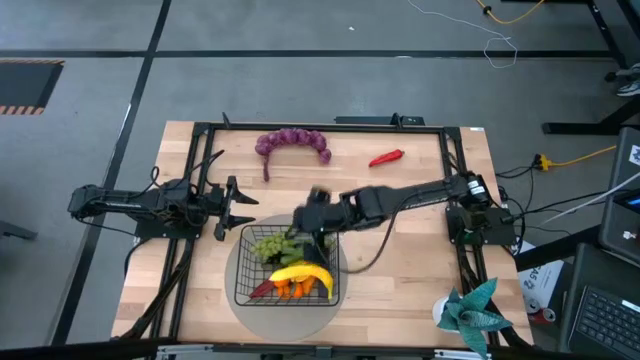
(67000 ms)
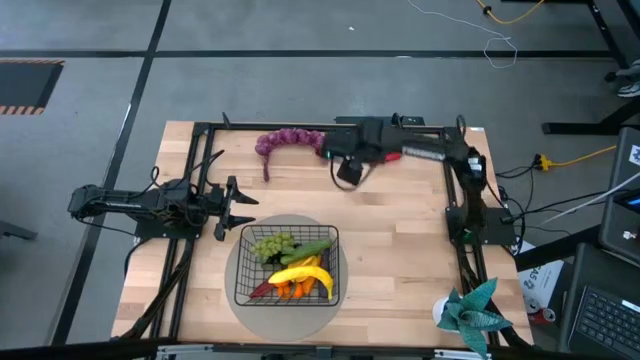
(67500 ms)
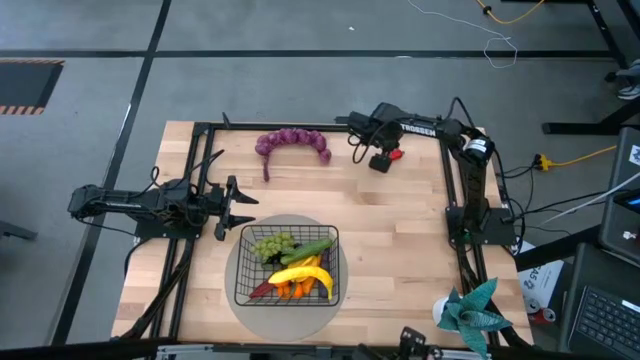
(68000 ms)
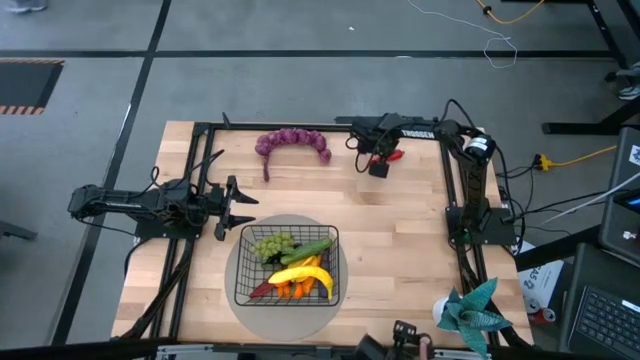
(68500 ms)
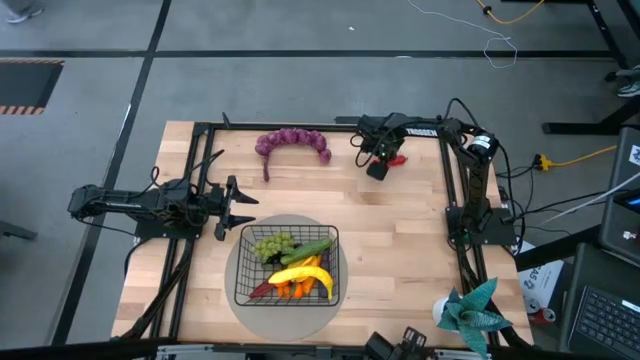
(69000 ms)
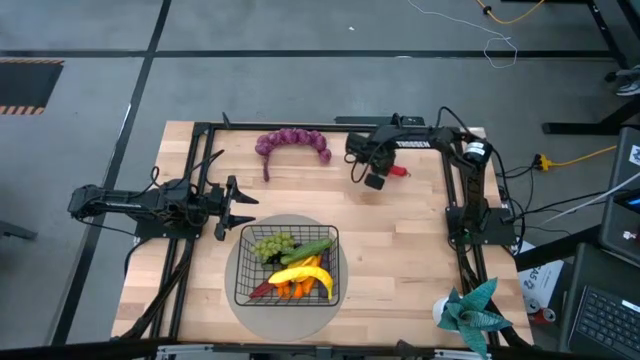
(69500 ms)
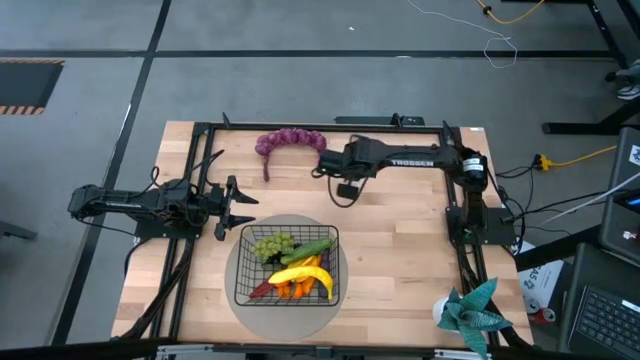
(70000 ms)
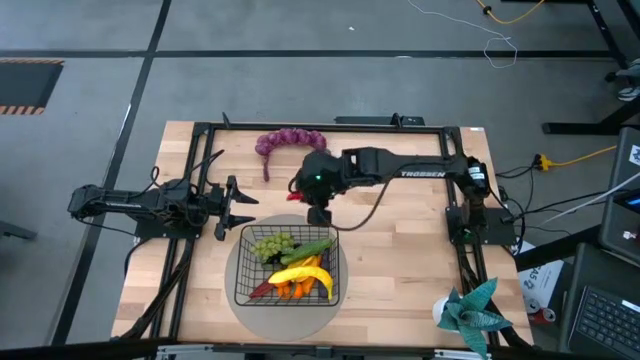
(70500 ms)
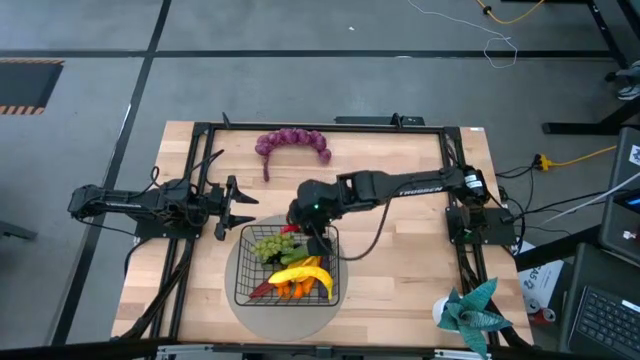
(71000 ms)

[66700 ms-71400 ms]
Task: Build produce basket
Put the red chili pepper into the black wire basket

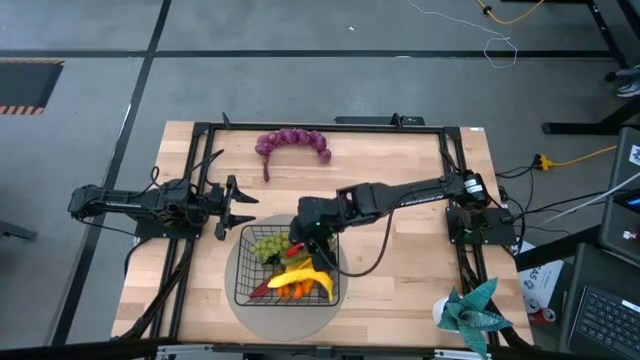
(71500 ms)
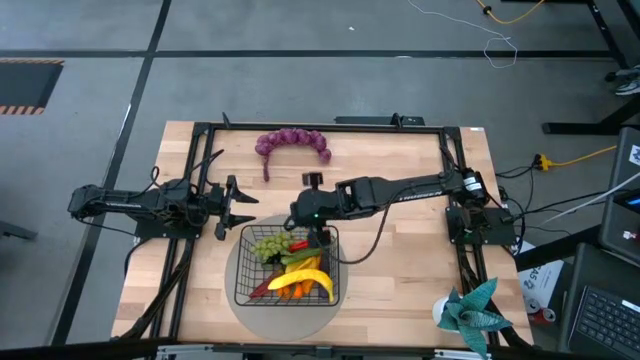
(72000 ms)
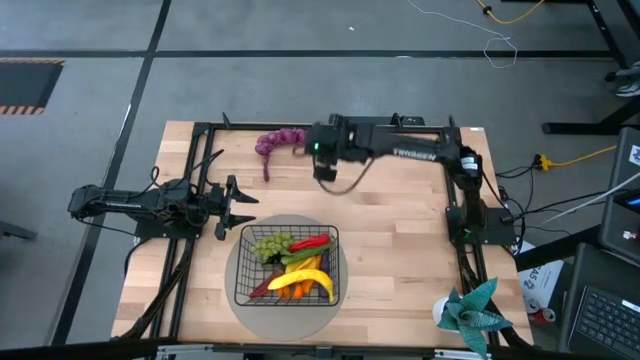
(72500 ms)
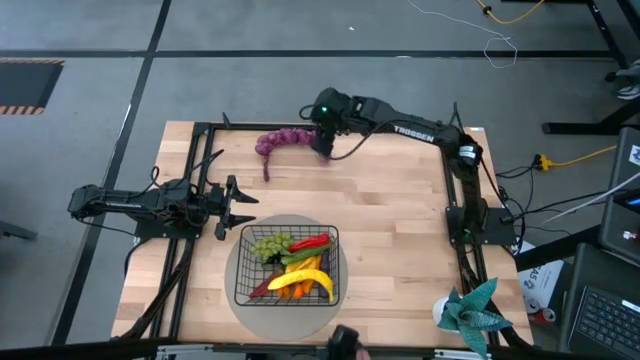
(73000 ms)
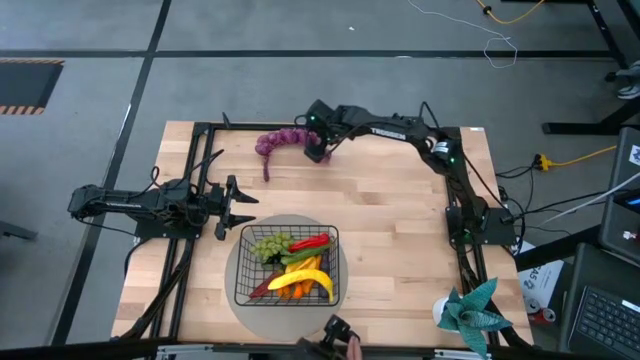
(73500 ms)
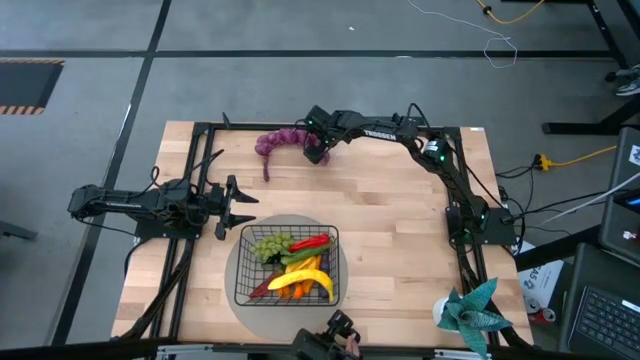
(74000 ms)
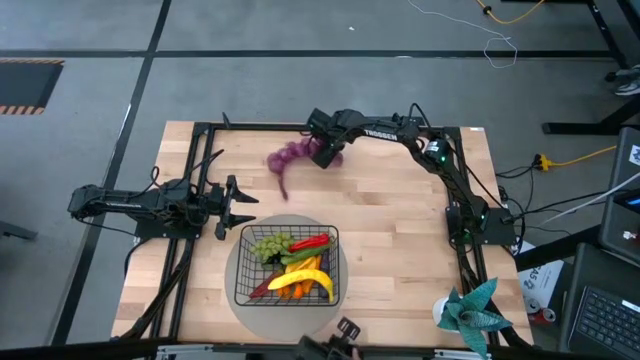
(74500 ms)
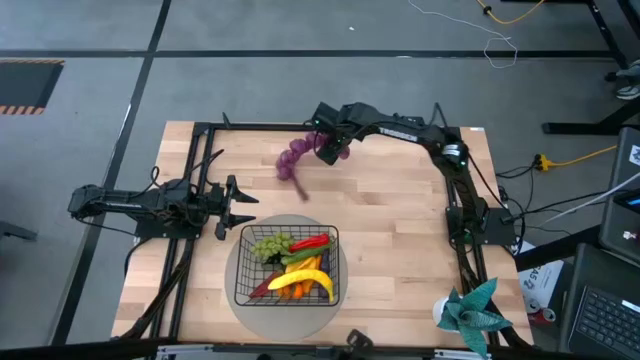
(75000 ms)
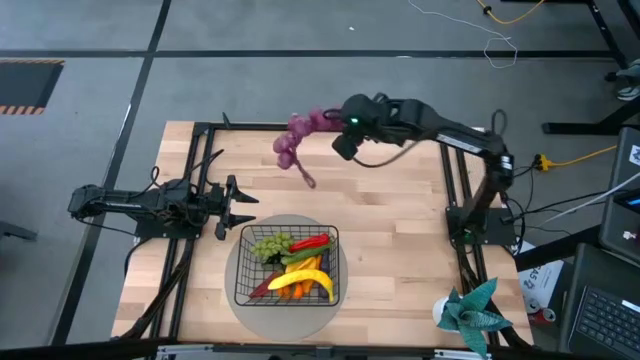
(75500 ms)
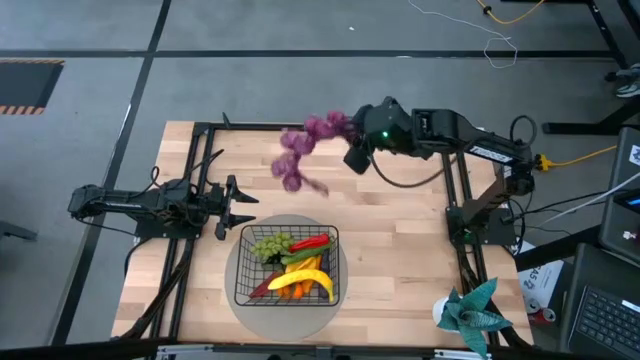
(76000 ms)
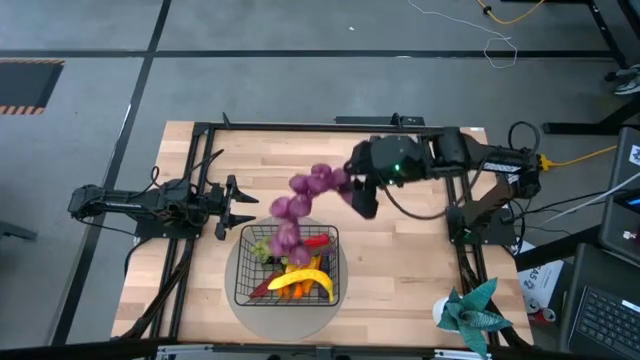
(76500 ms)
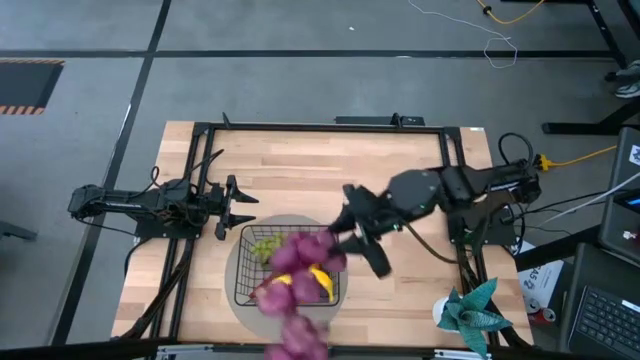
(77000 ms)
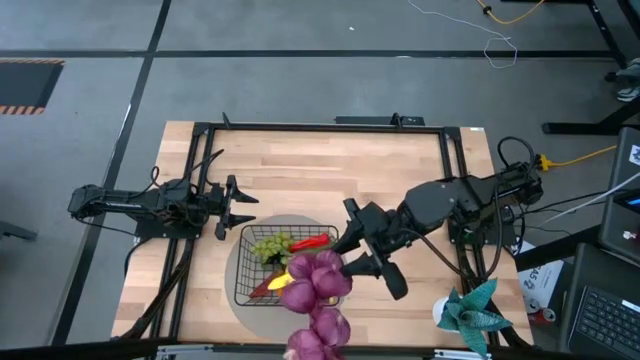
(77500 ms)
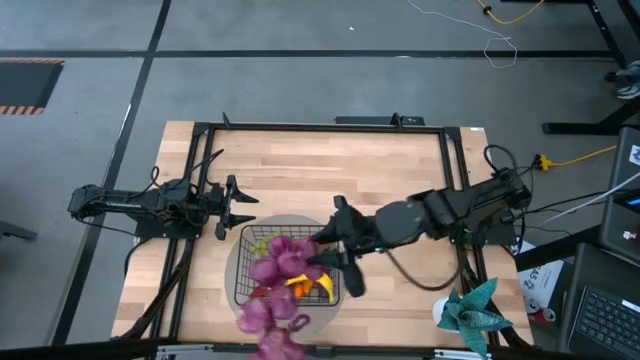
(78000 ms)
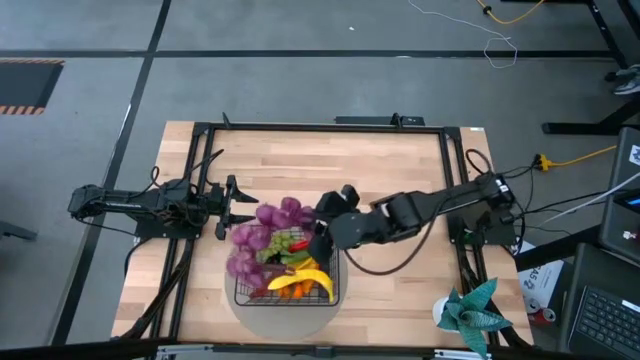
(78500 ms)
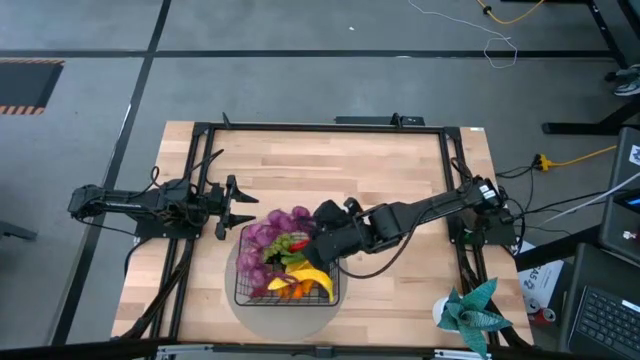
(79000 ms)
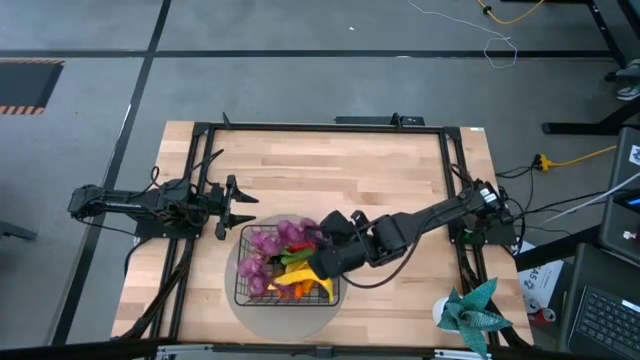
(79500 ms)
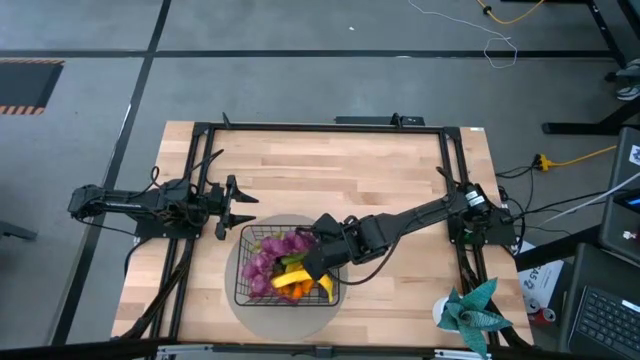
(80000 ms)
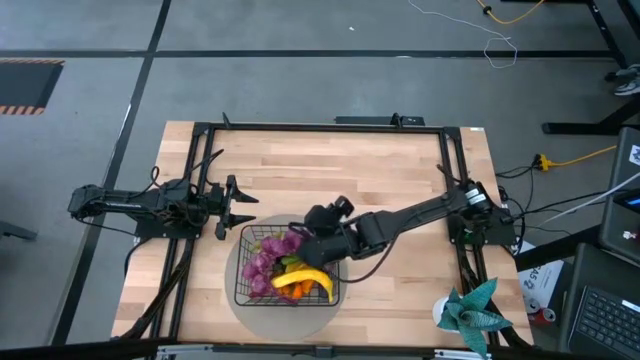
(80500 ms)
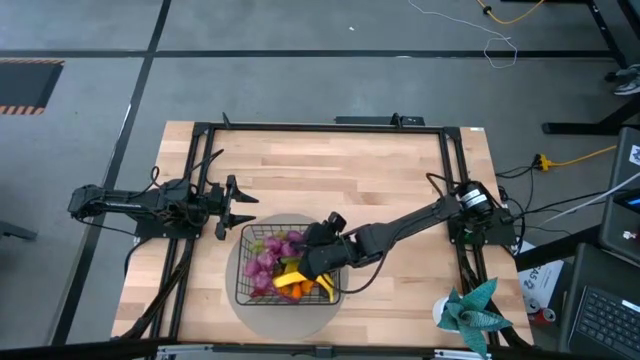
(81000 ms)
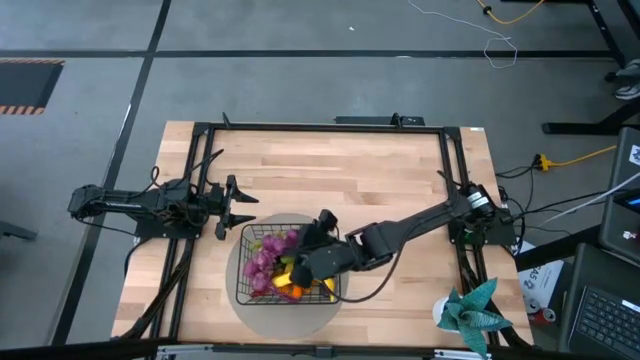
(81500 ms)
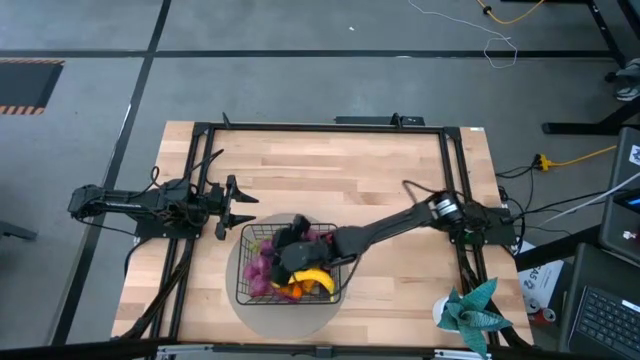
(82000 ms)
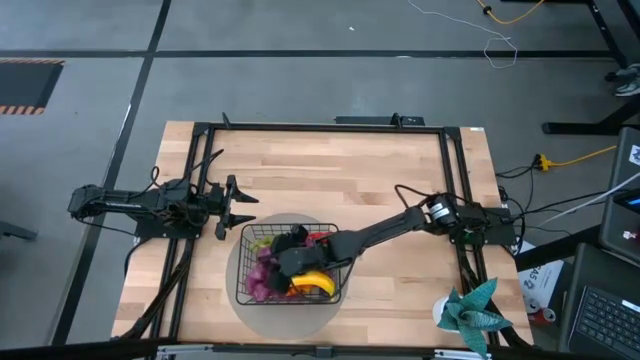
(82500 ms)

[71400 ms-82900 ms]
Put the purple garlic into the black wire basket
